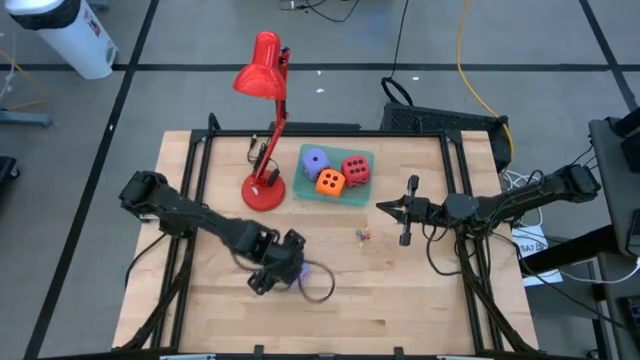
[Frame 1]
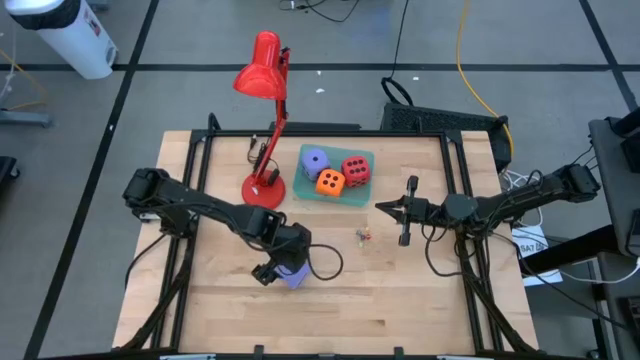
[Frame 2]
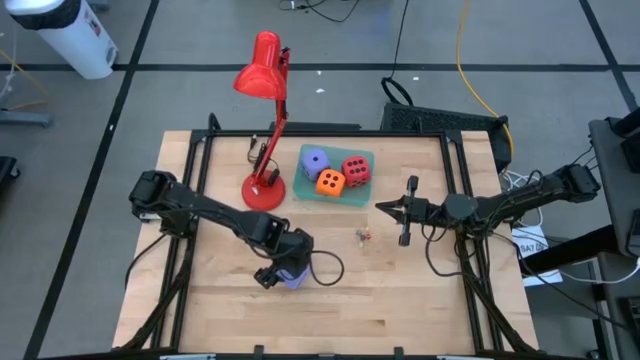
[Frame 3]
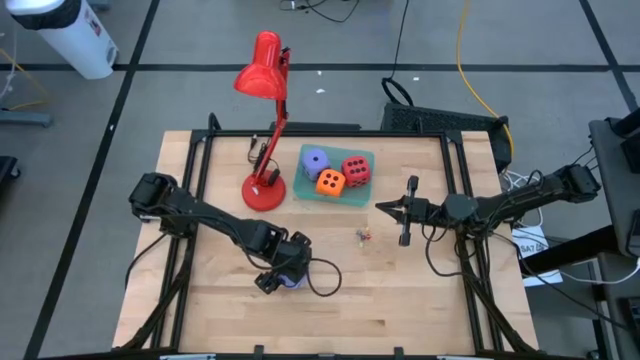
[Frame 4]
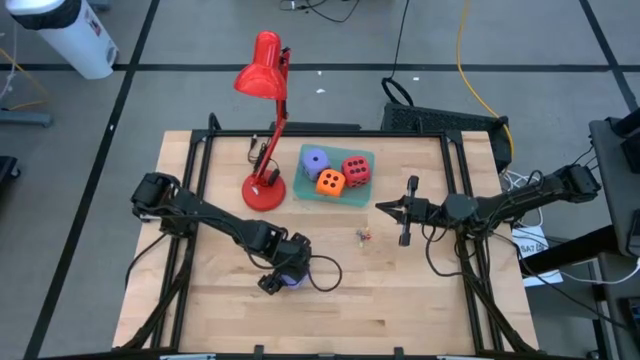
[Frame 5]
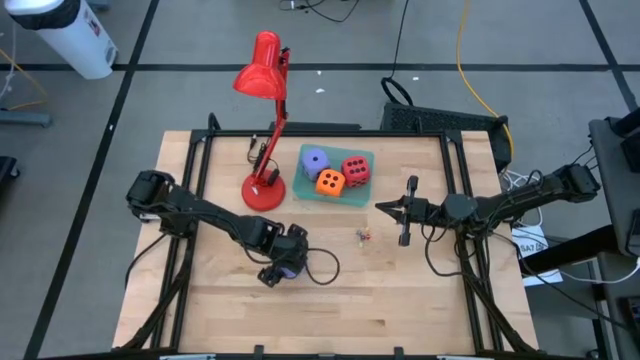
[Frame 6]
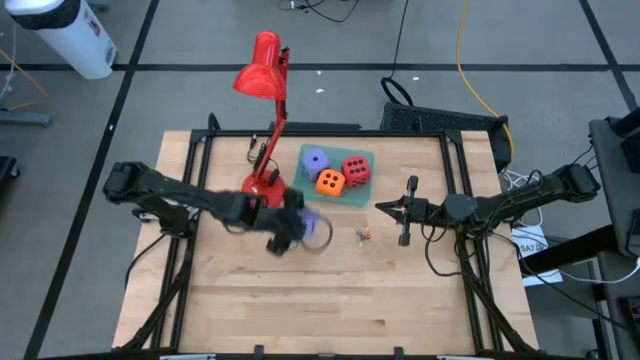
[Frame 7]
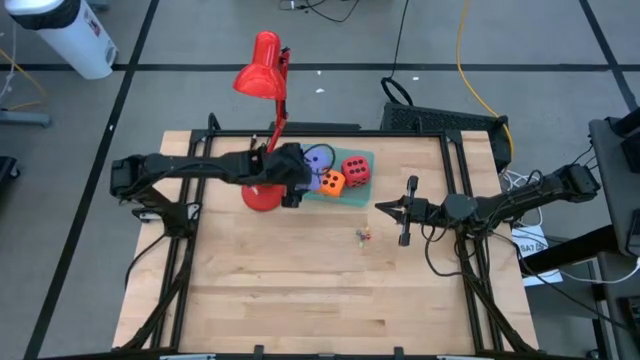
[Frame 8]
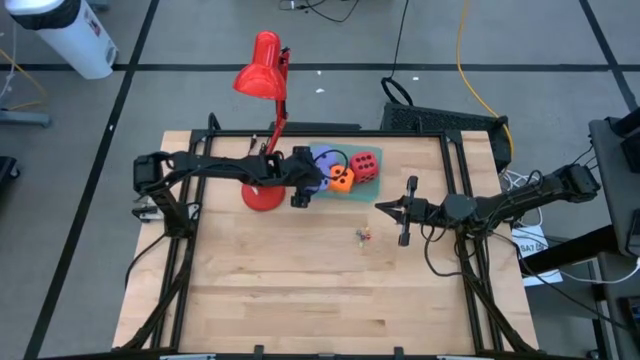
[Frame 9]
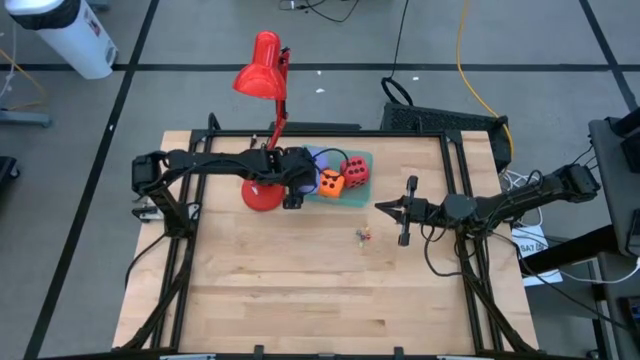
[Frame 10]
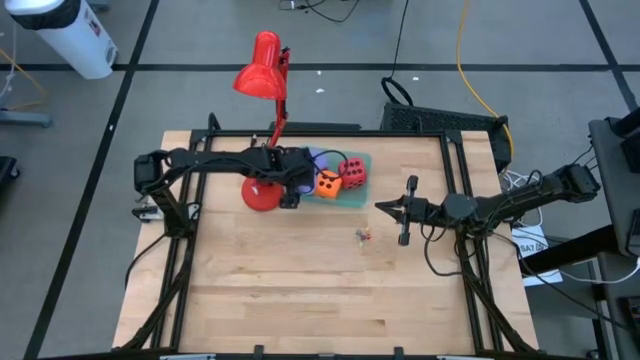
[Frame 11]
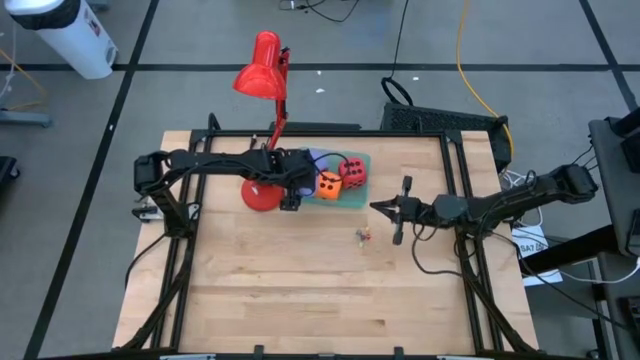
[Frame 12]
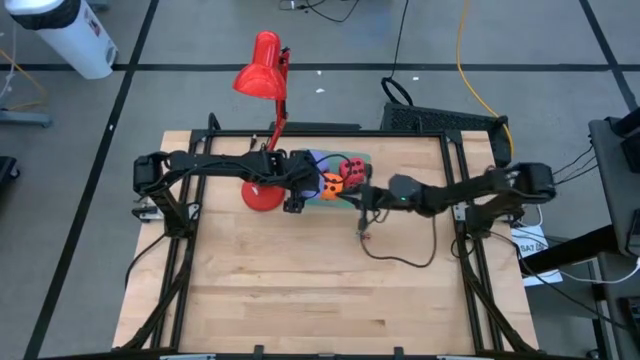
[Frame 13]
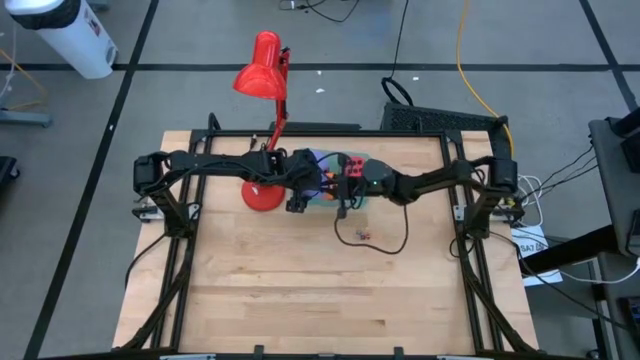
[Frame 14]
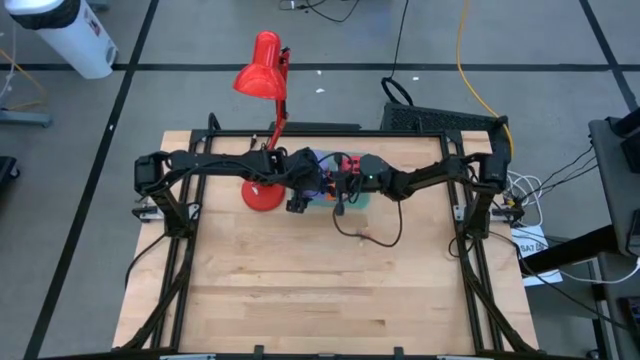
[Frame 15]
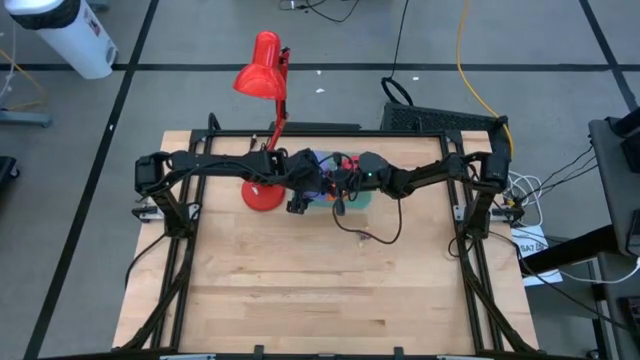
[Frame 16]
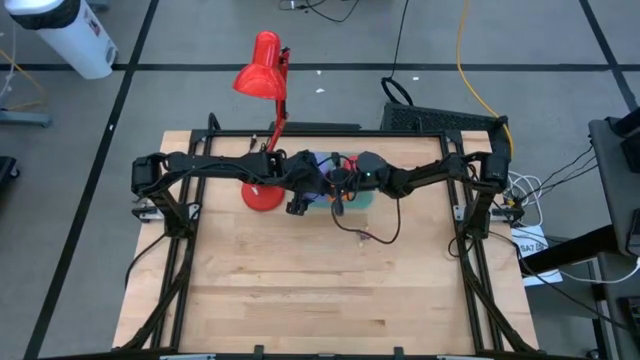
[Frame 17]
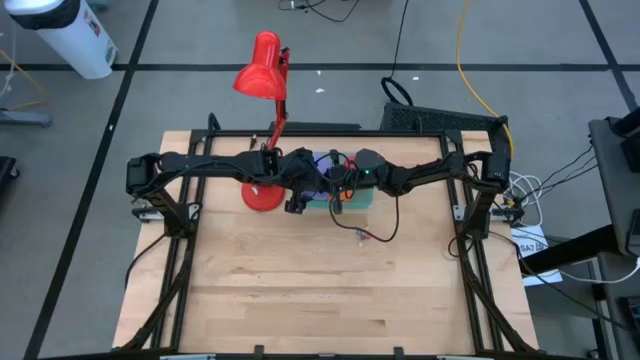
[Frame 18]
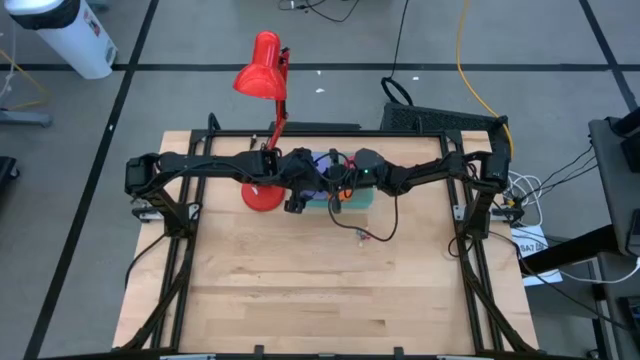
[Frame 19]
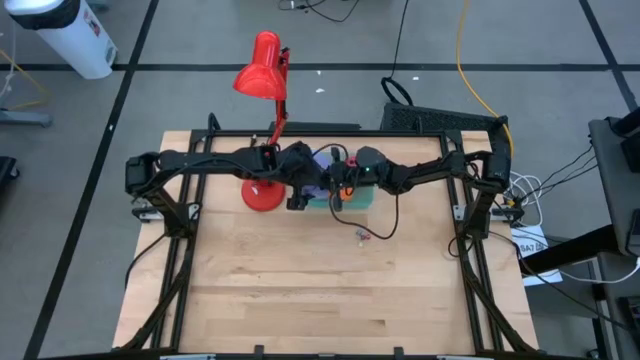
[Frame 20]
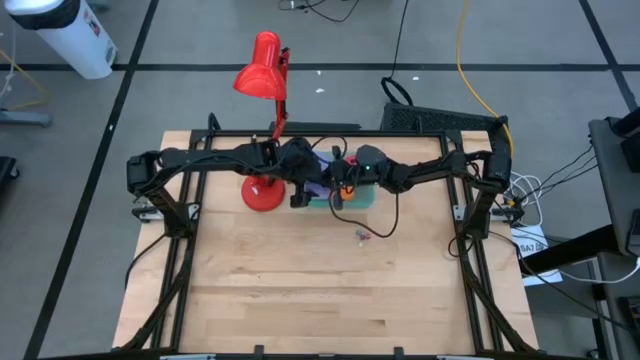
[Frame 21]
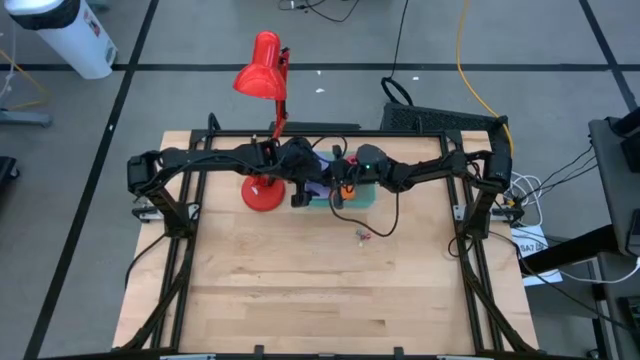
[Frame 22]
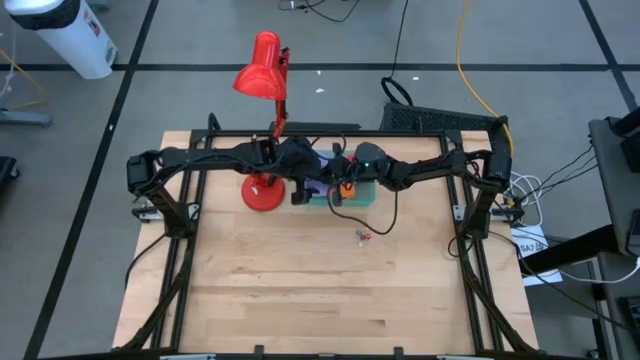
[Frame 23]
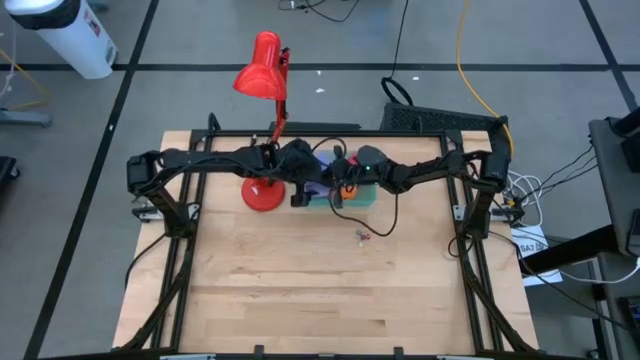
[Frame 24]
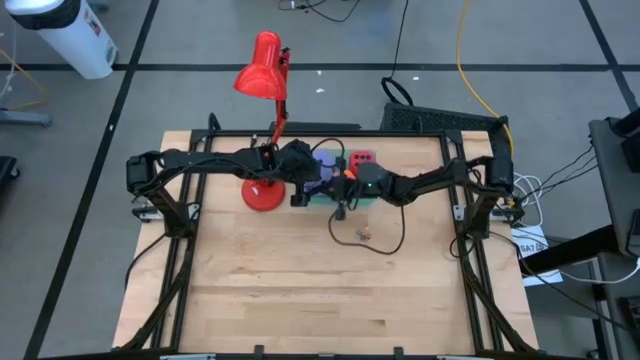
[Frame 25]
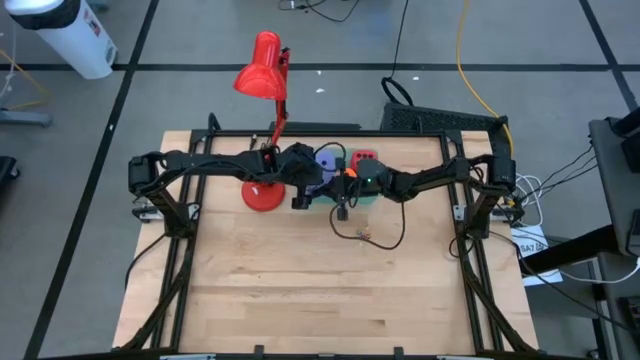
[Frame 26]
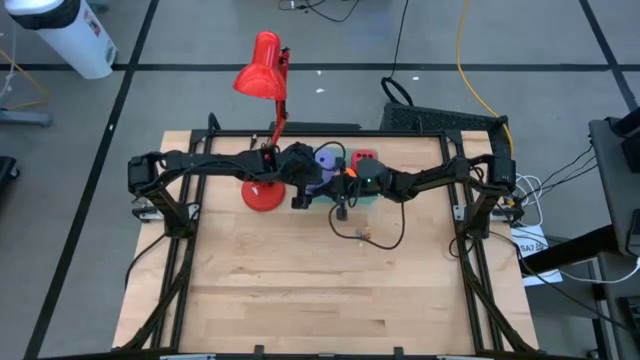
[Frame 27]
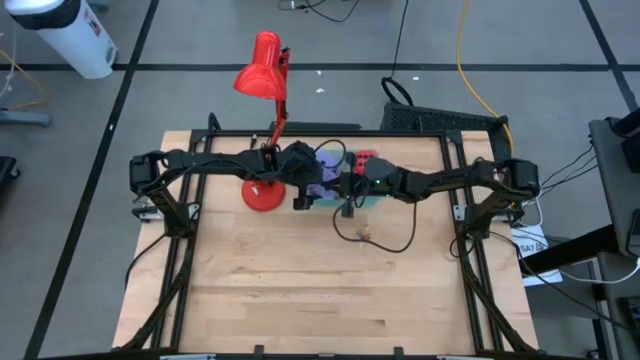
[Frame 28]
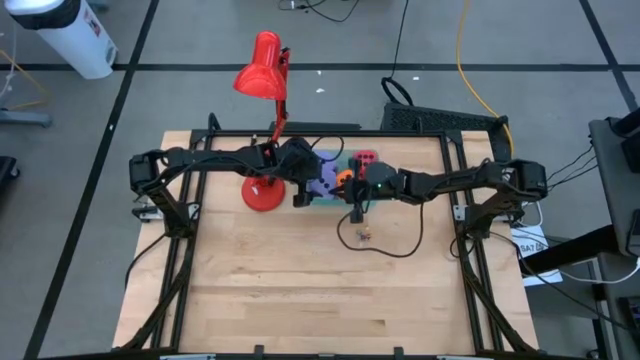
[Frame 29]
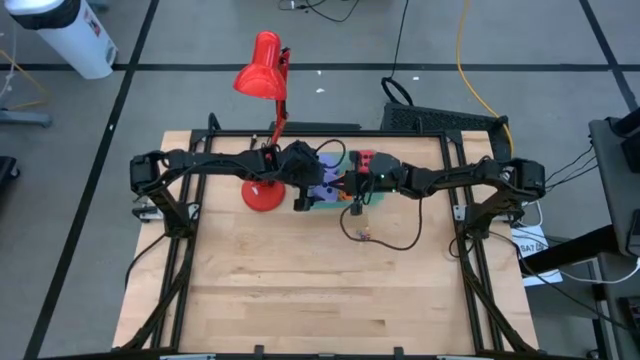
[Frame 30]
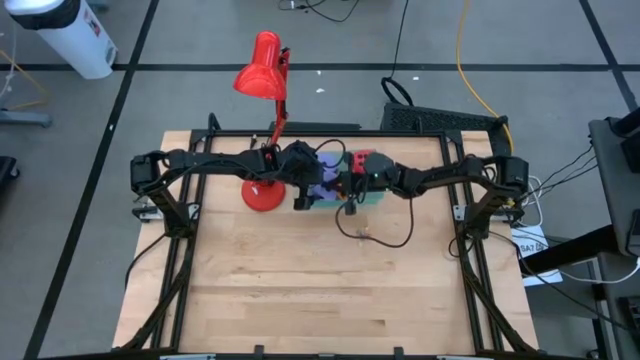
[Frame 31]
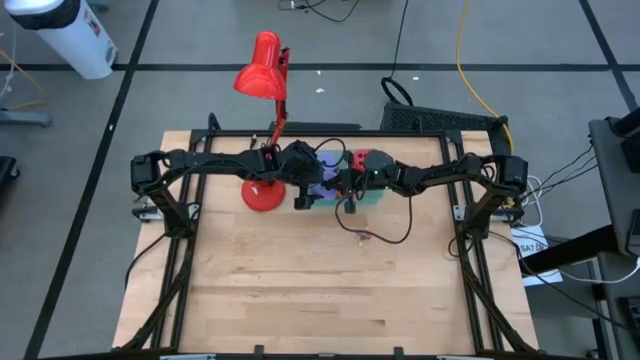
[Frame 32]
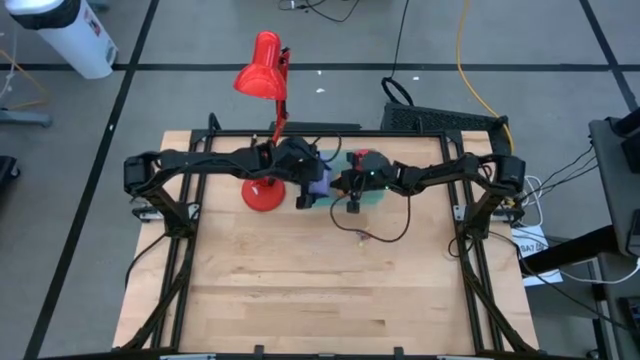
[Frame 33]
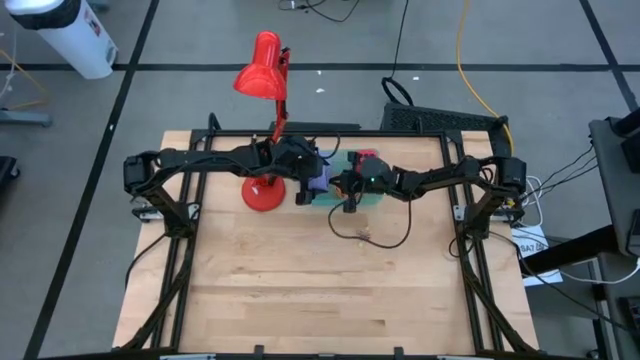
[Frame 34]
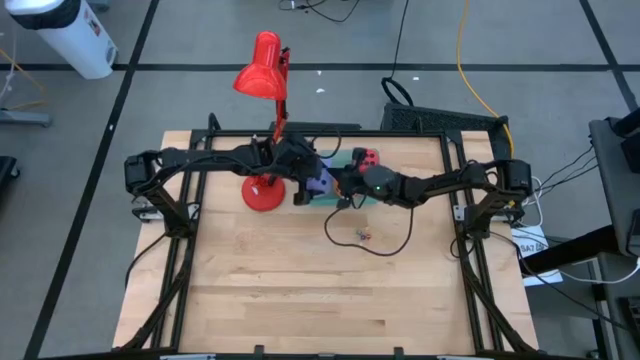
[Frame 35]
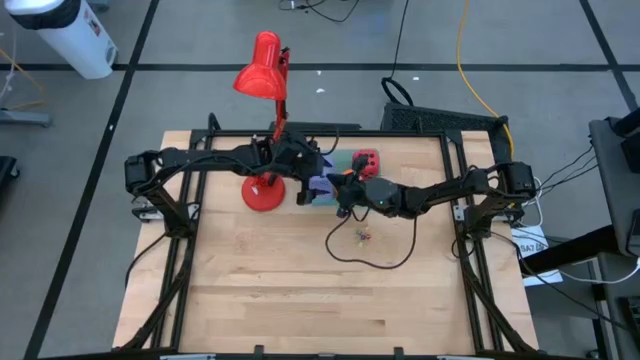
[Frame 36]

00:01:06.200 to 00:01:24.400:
Task: Pick & Place Dice
Put the light purple die into the green bin

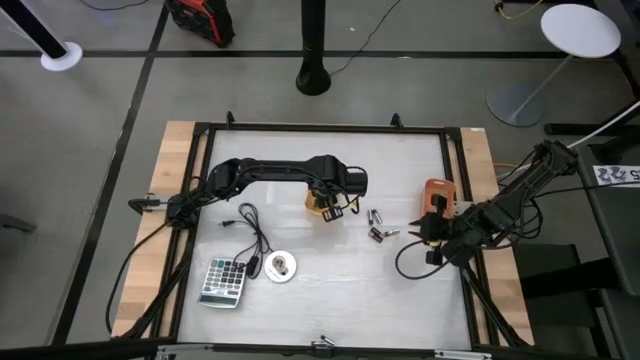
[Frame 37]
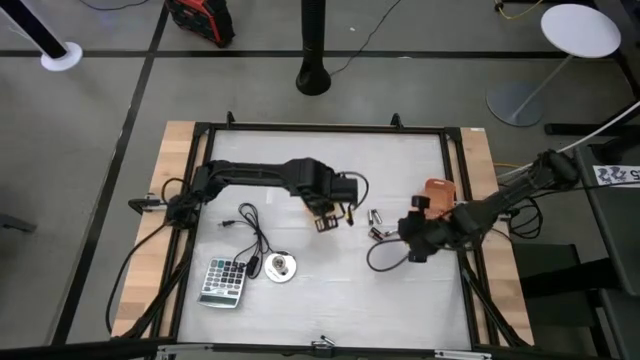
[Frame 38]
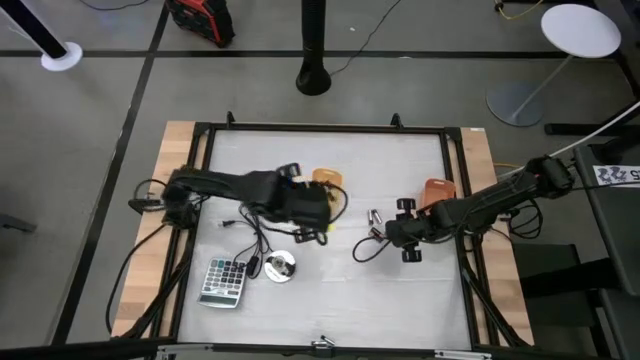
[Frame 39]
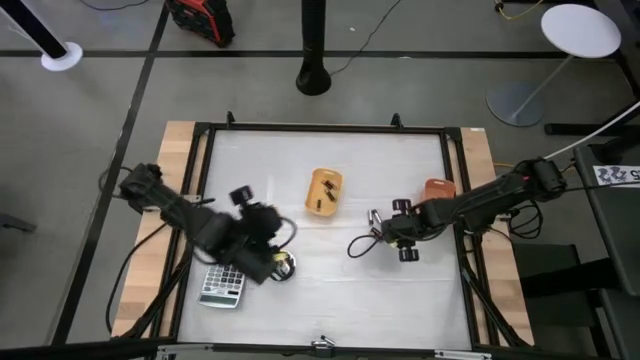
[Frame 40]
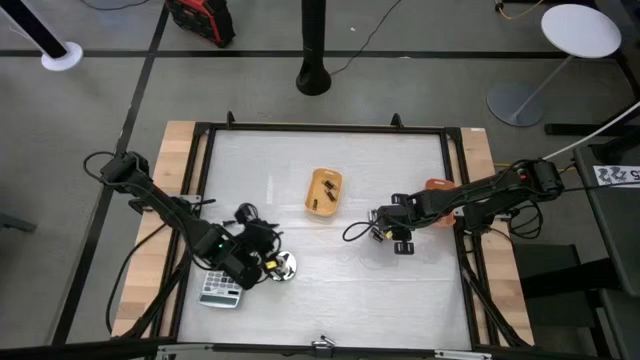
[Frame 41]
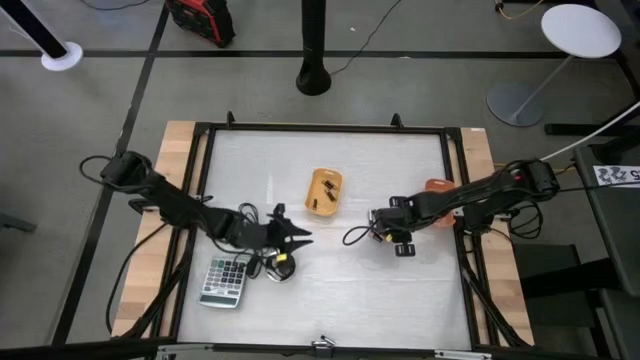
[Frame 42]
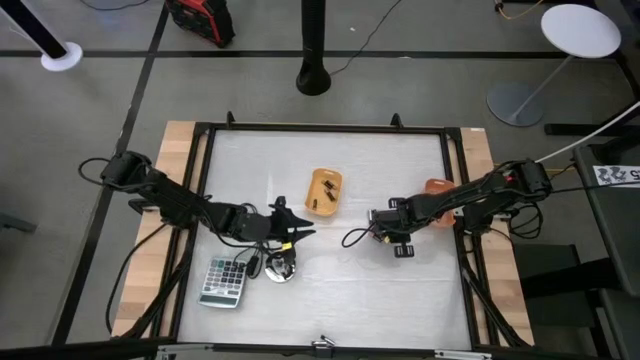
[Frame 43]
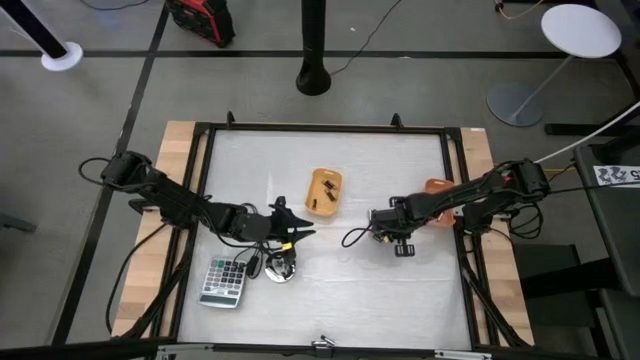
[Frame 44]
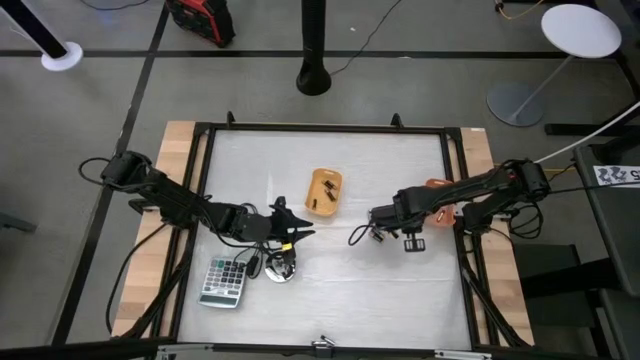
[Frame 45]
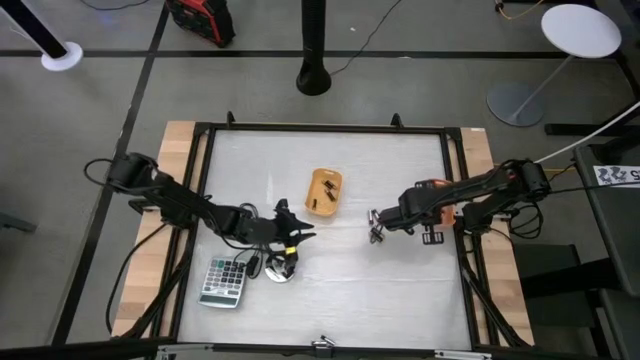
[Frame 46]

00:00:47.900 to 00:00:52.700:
Task: Sort batteries
Put the silver battery into the orange bin
